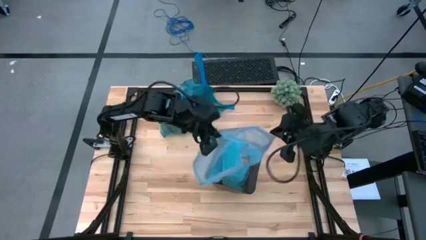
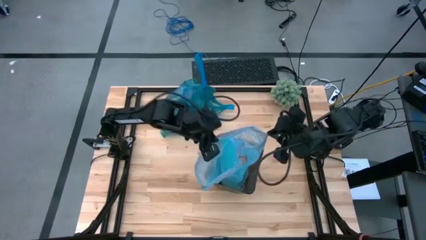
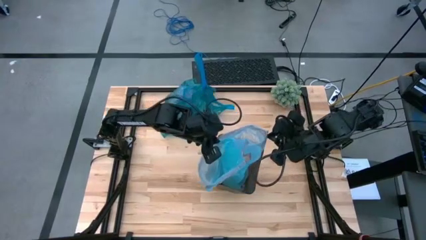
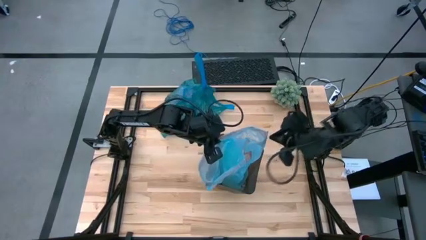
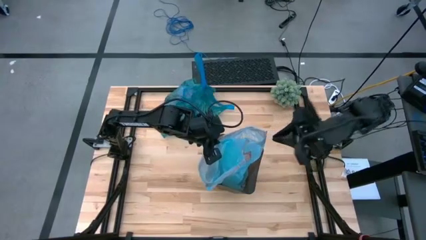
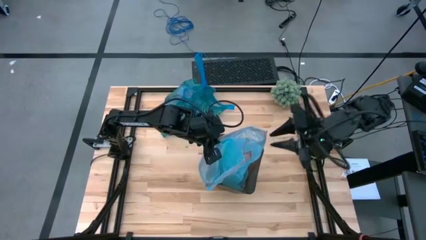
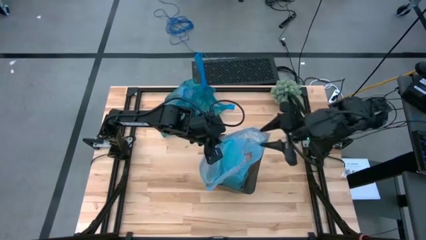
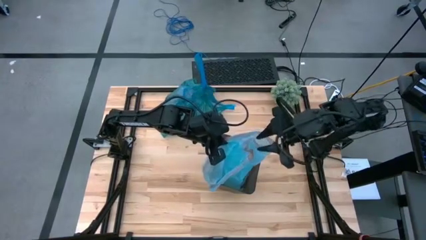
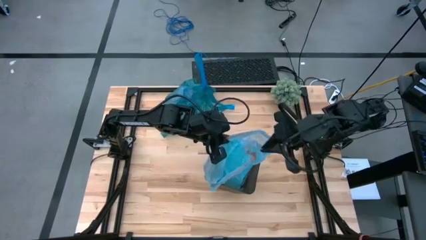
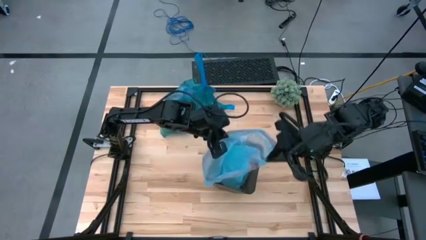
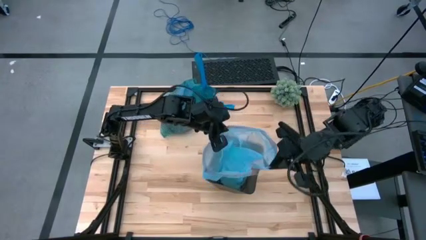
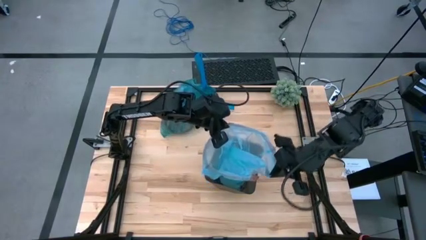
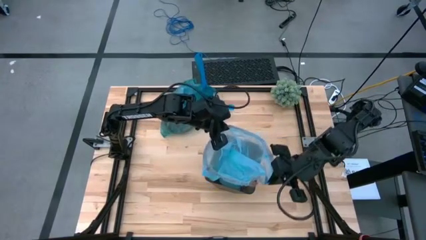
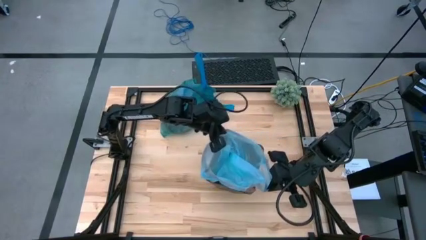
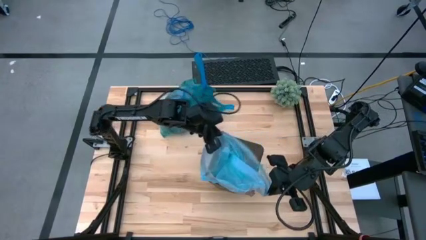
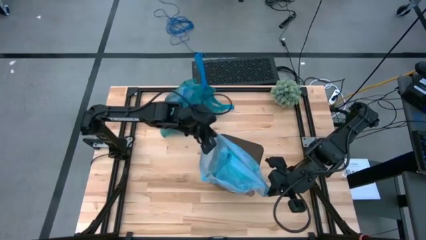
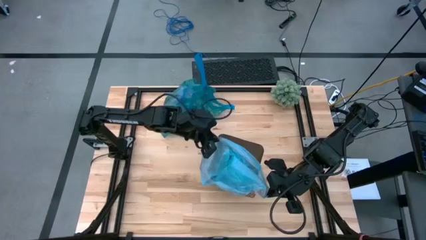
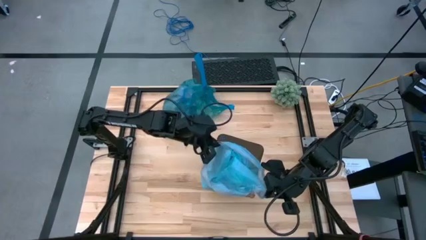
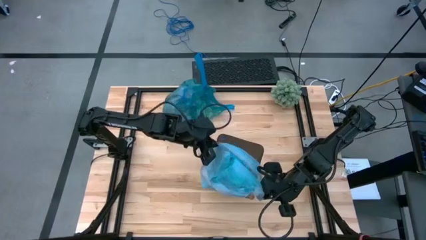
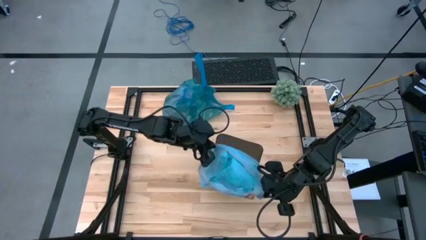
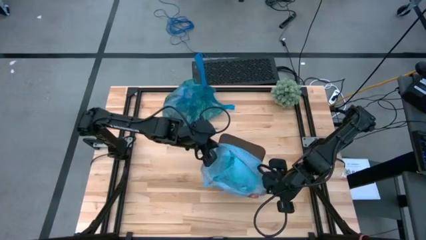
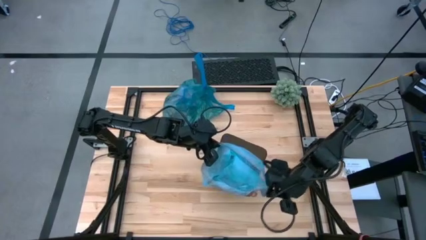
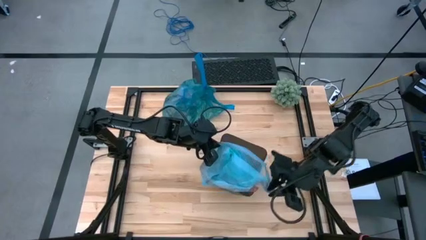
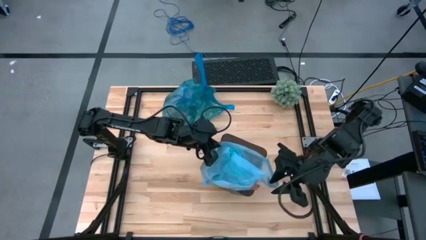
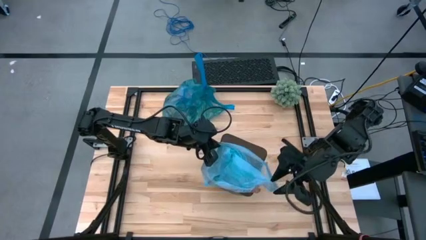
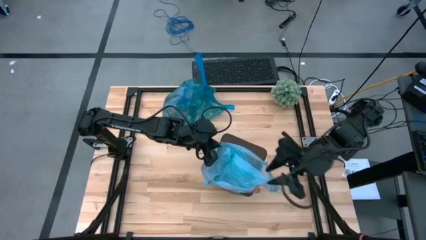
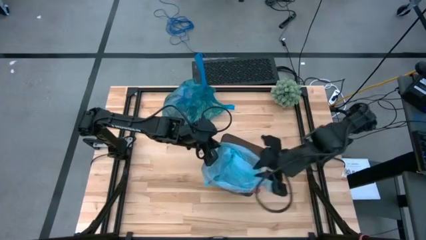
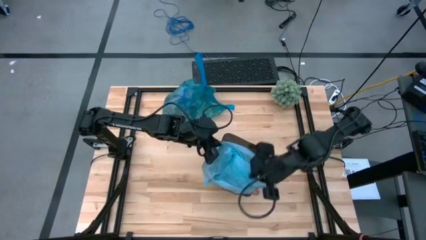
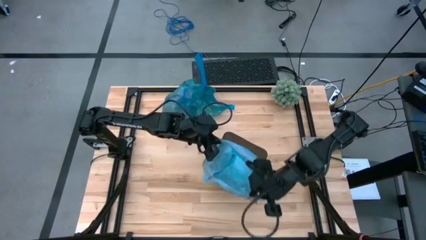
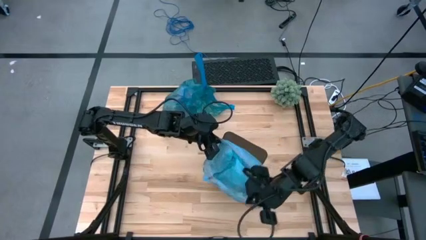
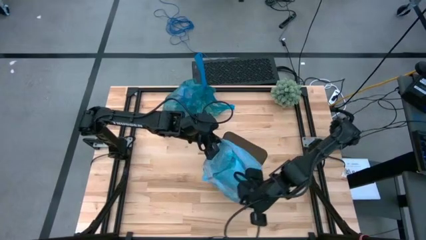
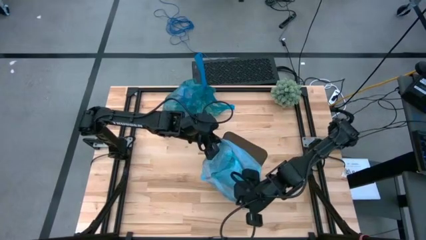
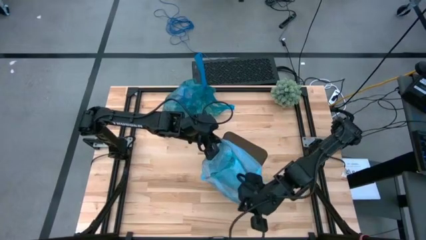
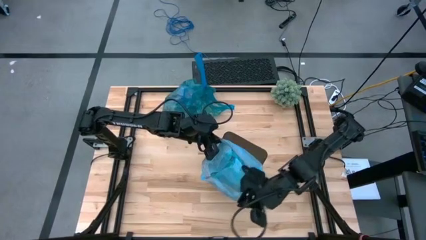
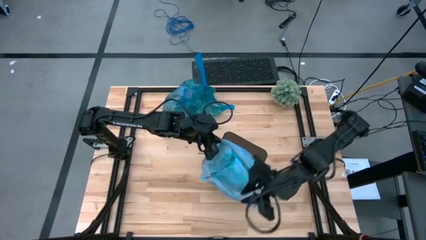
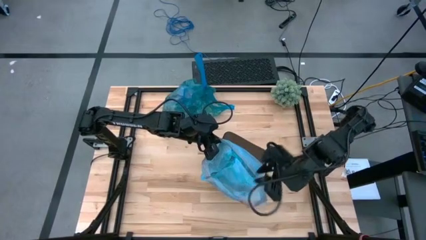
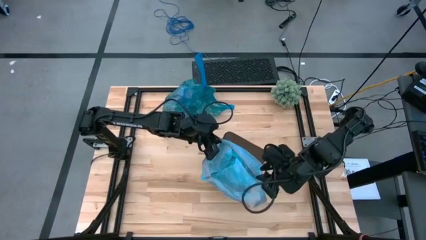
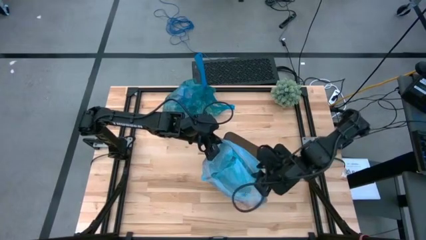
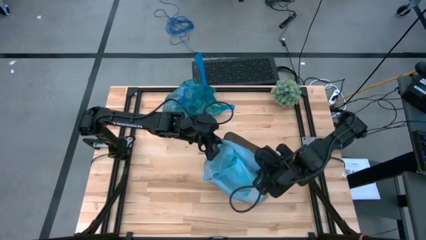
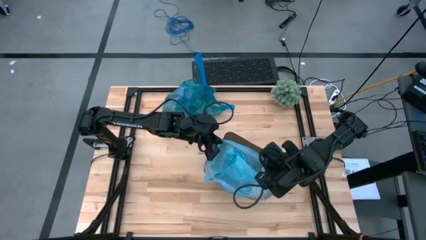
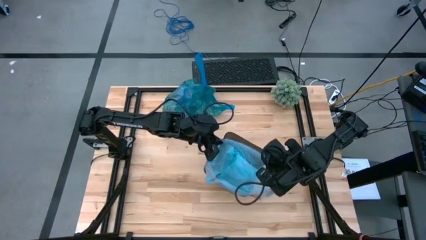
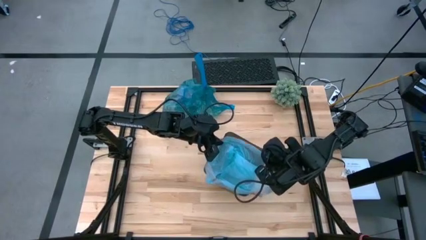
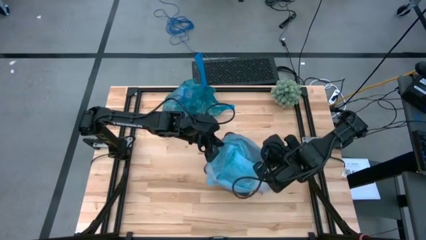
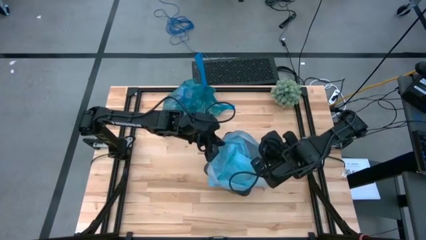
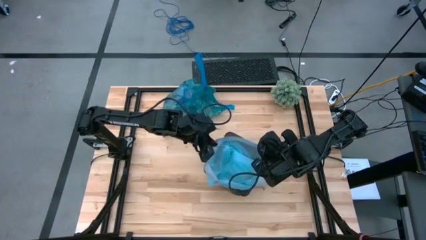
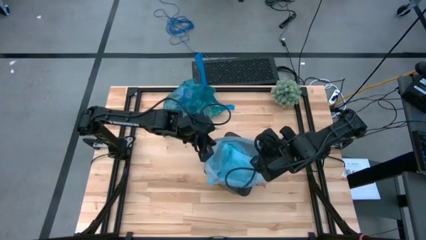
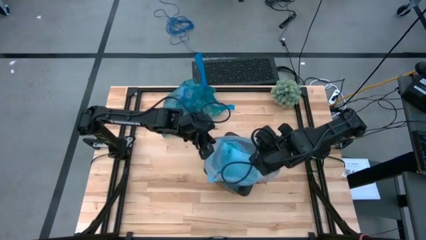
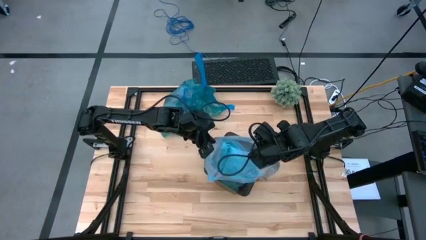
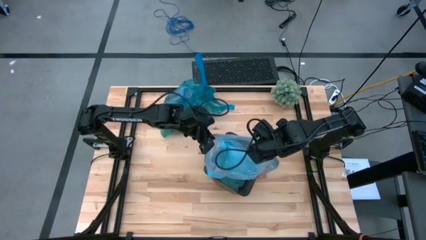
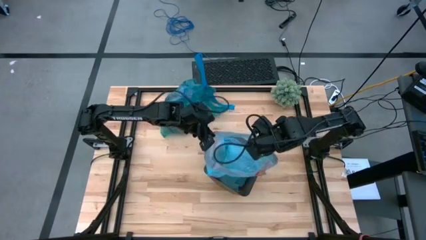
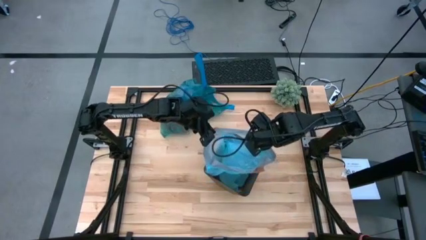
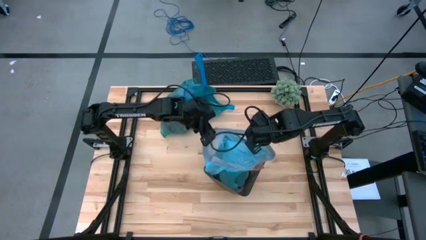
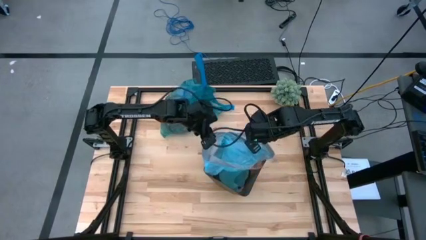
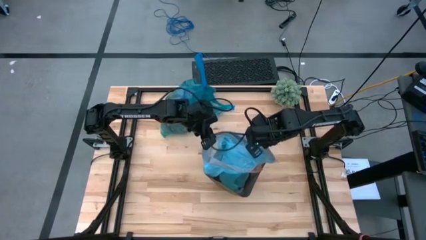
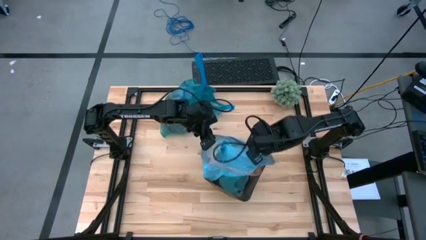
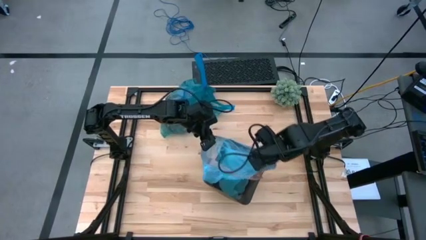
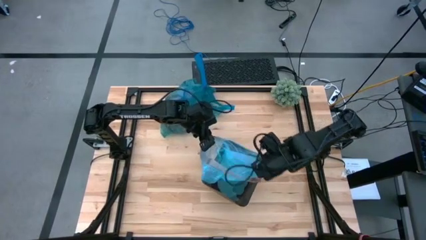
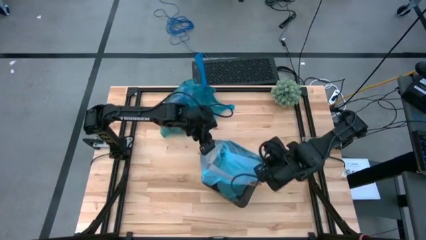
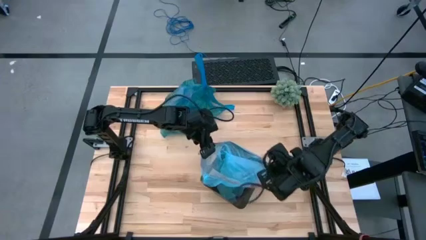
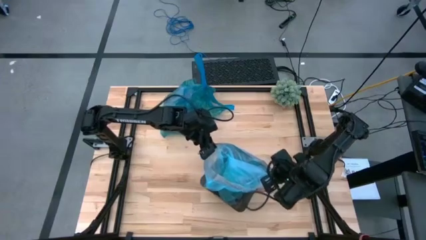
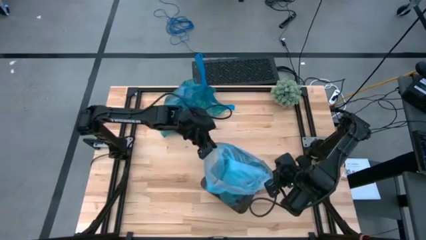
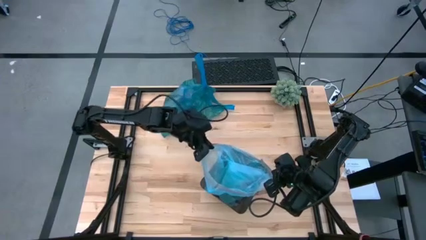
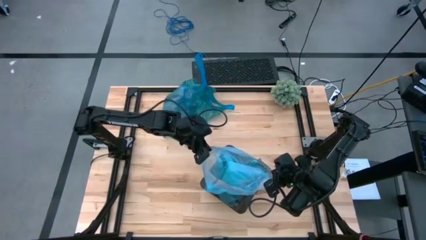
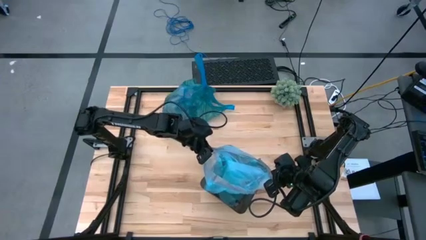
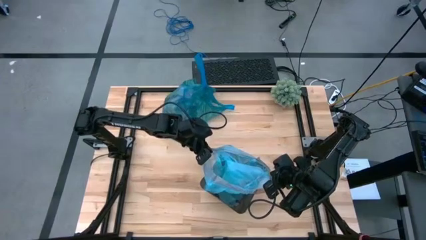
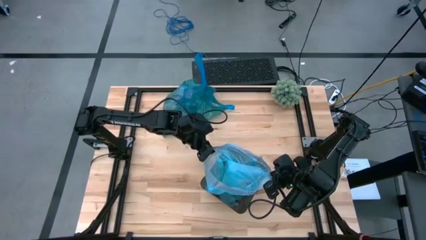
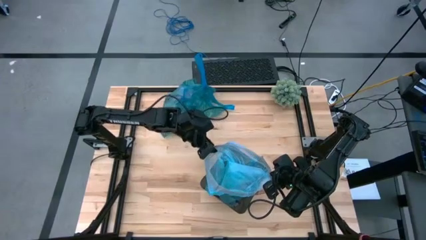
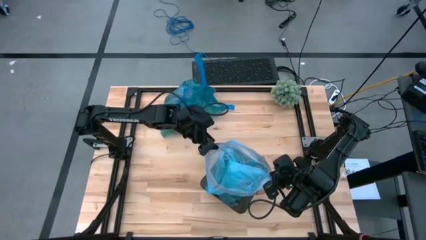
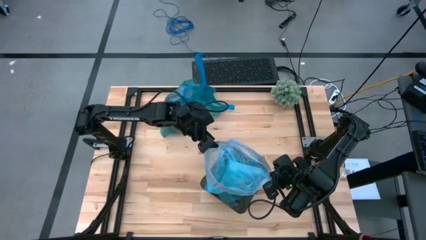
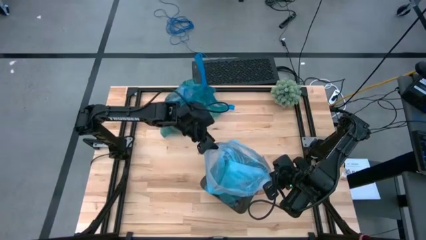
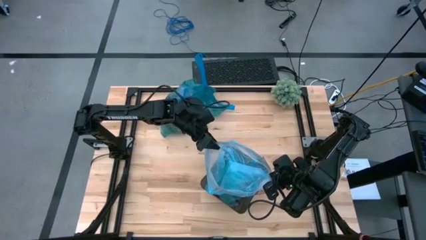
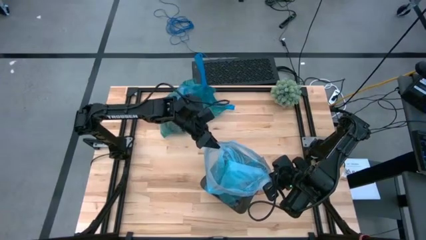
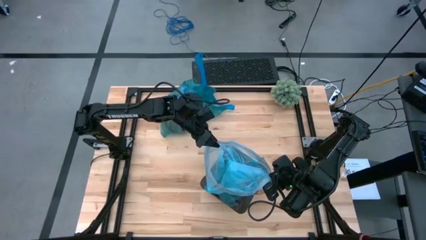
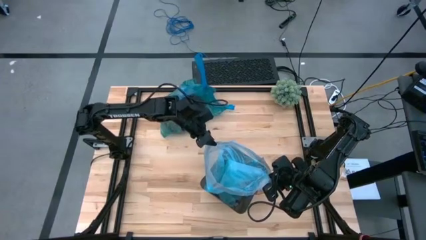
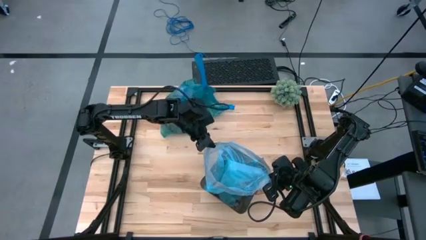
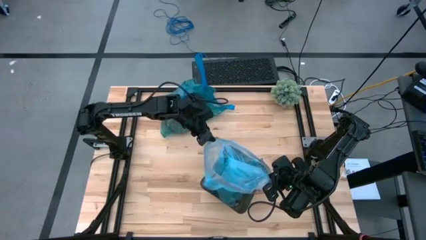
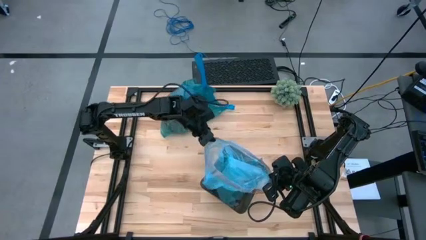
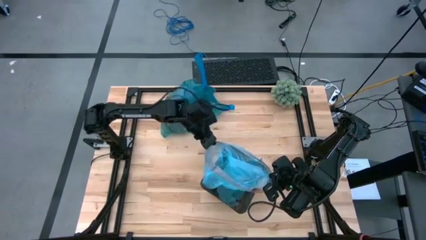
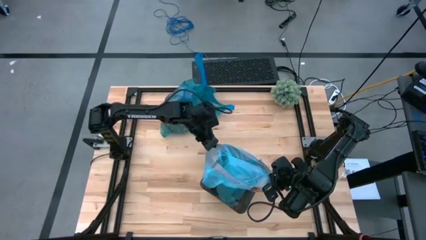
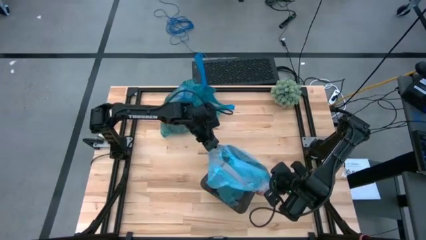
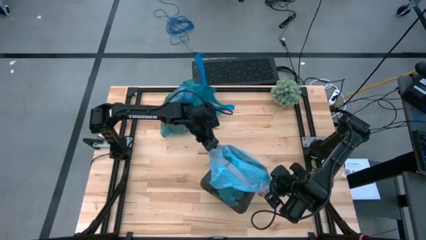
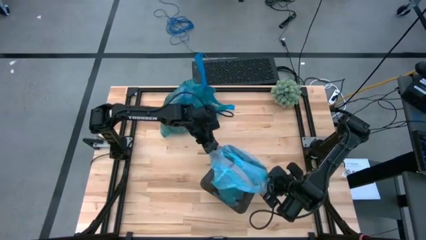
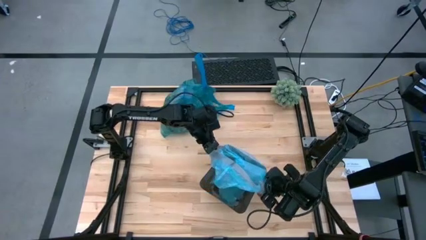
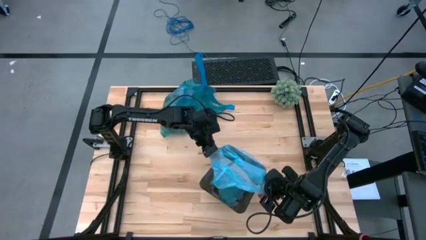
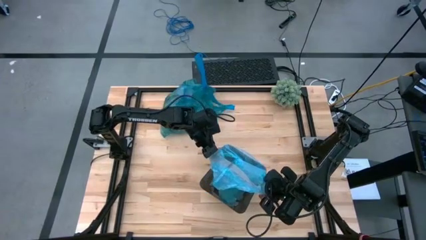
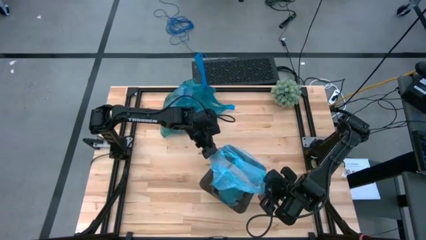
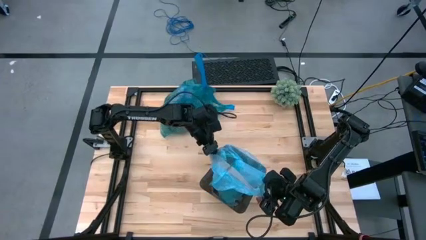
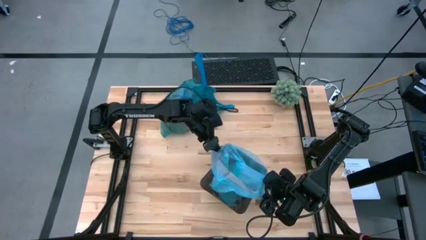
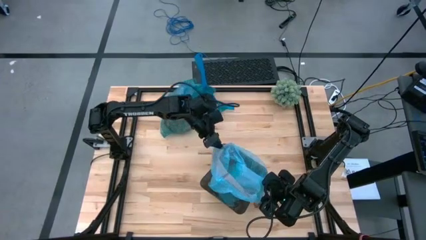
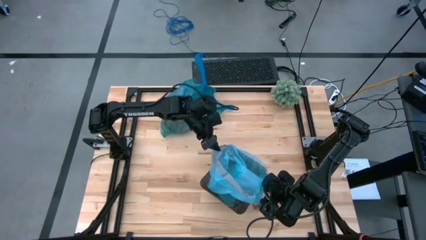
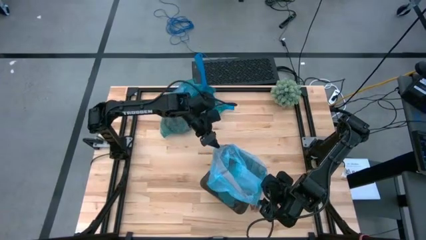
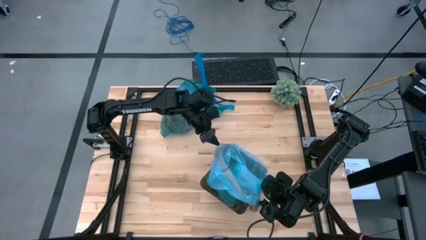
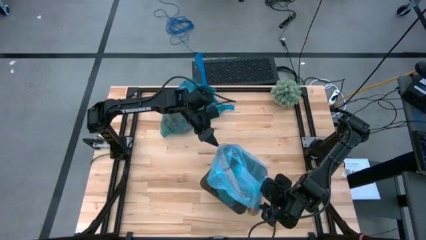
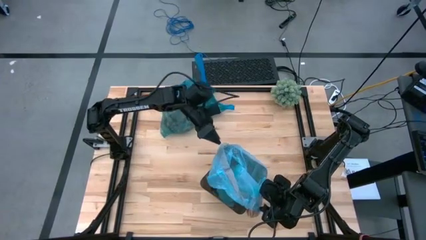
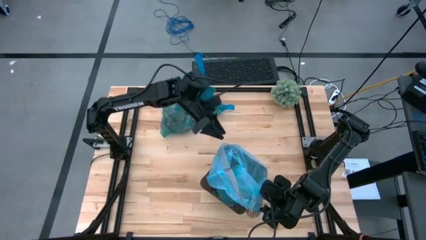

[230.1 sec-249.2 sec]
Task: place trash/remove bag and relplace
Insert the new trash bag into the trash bin
